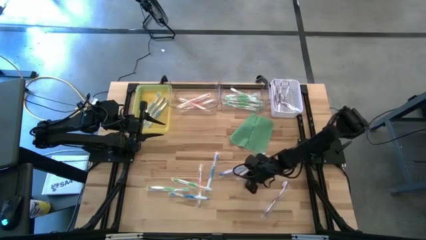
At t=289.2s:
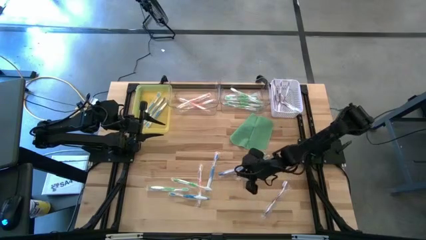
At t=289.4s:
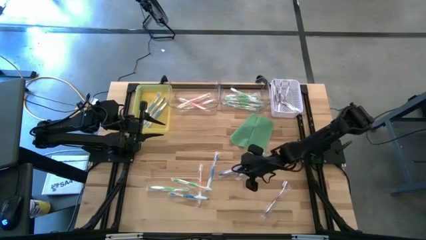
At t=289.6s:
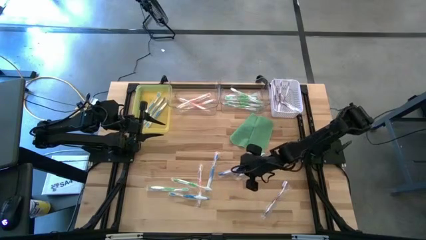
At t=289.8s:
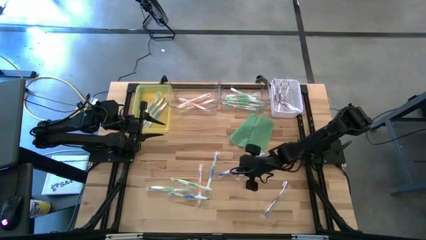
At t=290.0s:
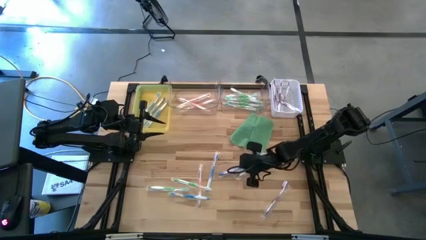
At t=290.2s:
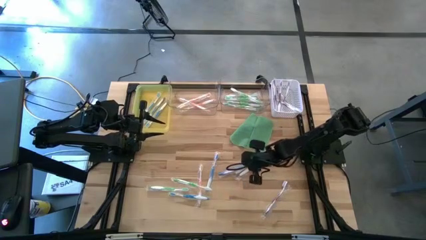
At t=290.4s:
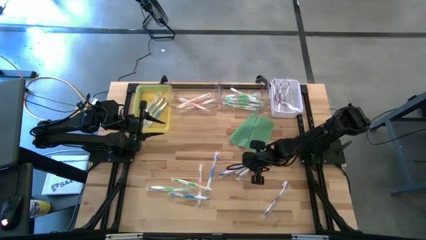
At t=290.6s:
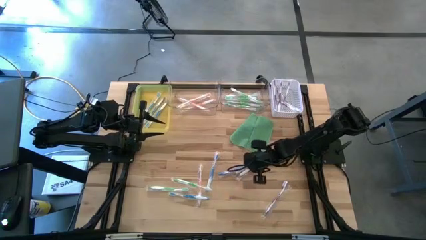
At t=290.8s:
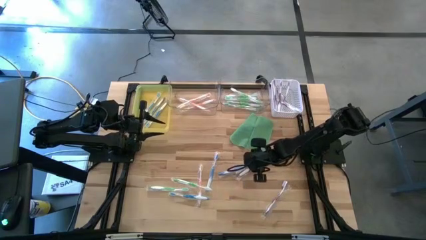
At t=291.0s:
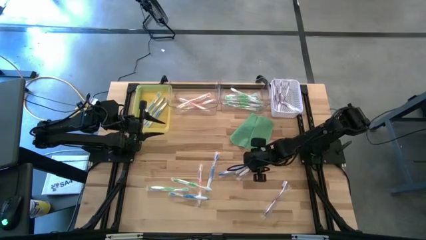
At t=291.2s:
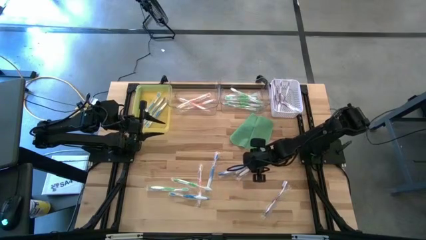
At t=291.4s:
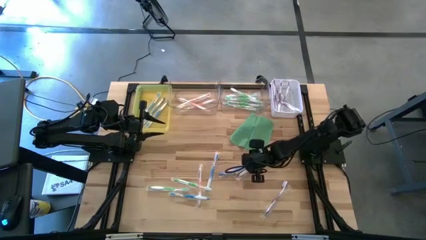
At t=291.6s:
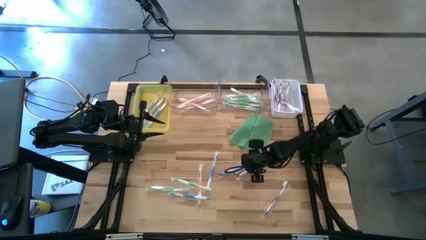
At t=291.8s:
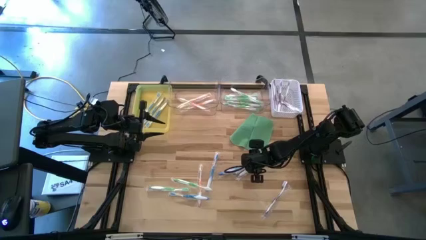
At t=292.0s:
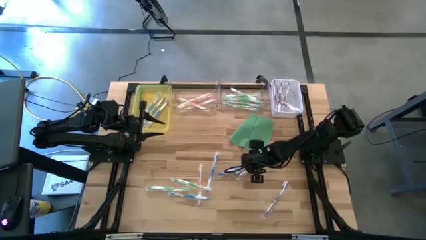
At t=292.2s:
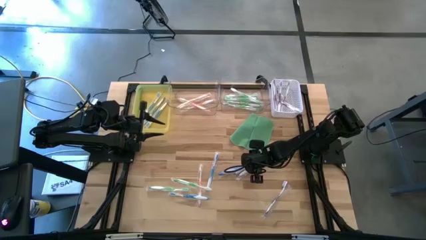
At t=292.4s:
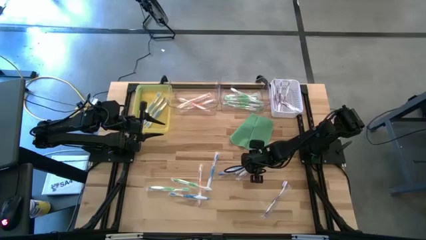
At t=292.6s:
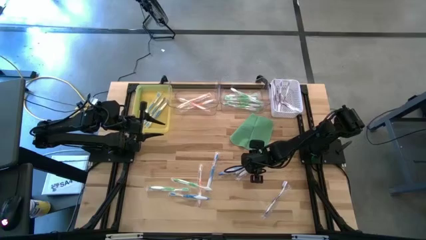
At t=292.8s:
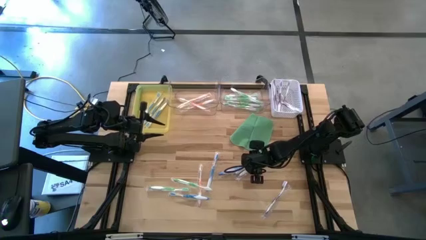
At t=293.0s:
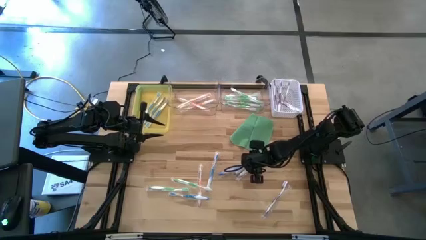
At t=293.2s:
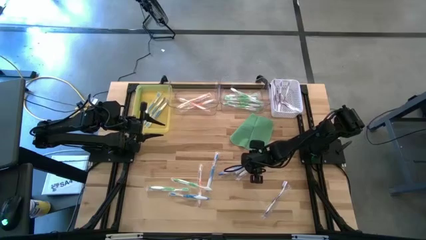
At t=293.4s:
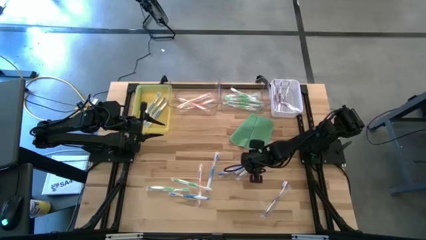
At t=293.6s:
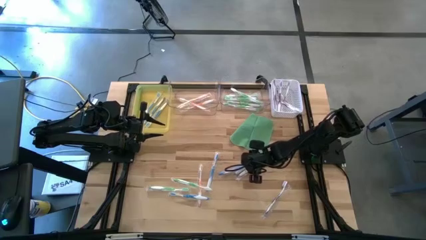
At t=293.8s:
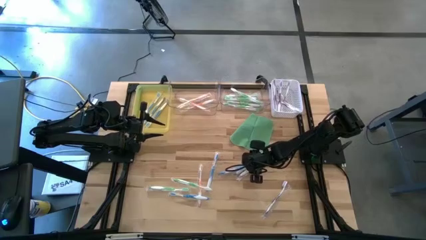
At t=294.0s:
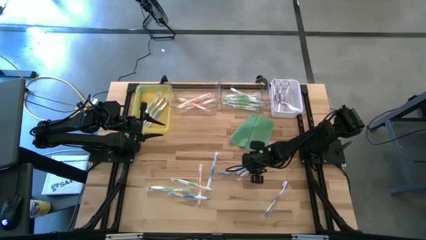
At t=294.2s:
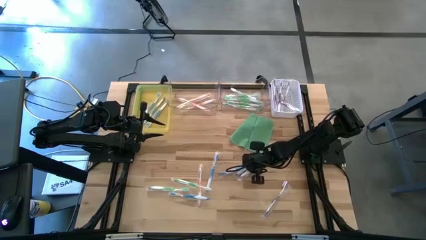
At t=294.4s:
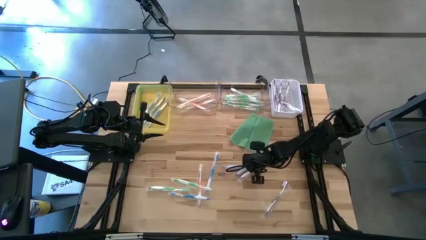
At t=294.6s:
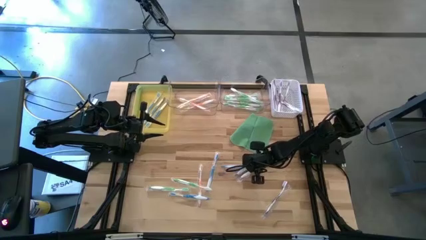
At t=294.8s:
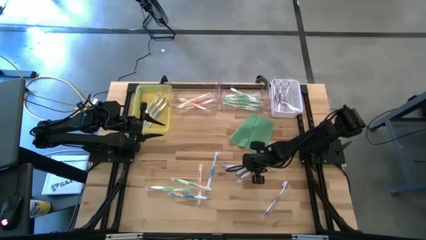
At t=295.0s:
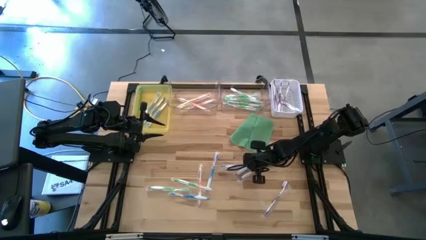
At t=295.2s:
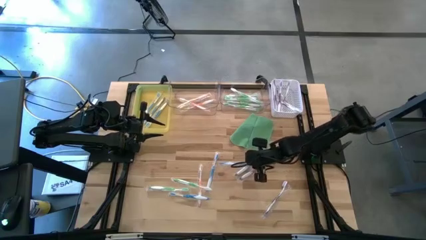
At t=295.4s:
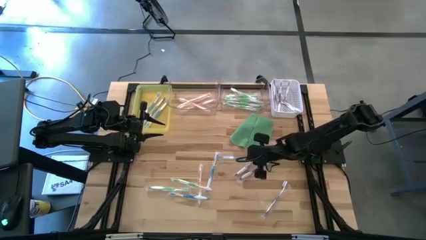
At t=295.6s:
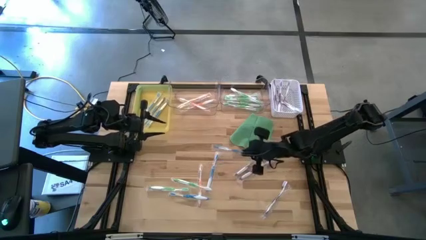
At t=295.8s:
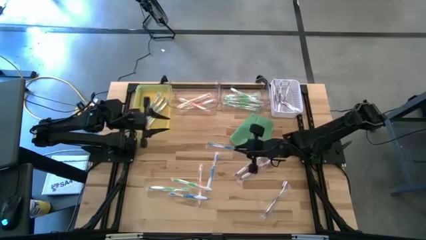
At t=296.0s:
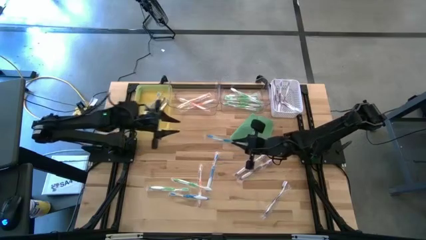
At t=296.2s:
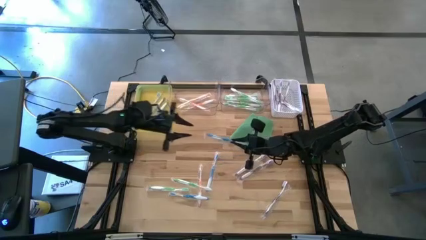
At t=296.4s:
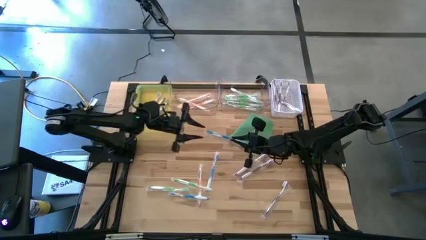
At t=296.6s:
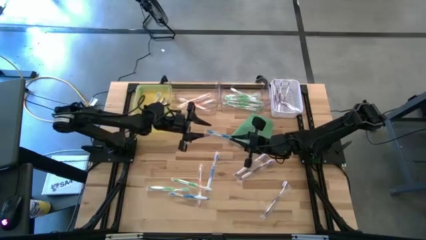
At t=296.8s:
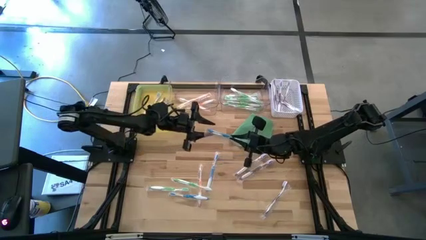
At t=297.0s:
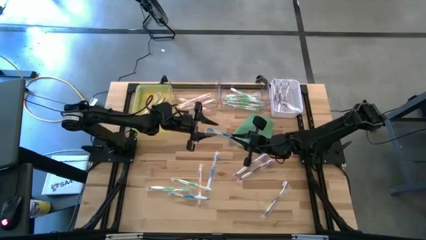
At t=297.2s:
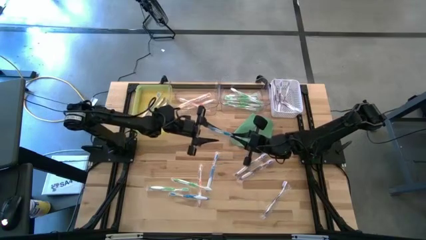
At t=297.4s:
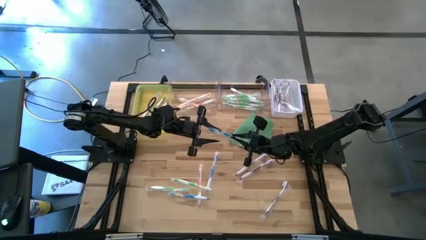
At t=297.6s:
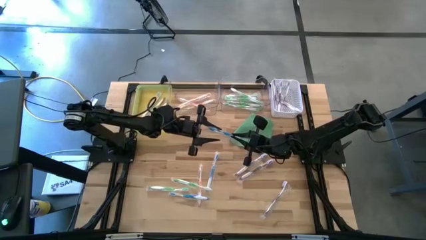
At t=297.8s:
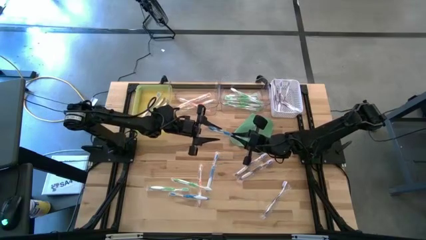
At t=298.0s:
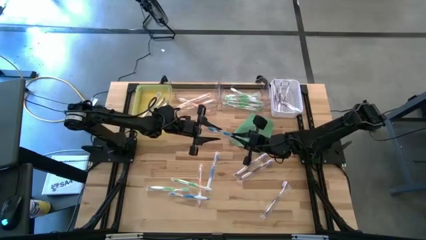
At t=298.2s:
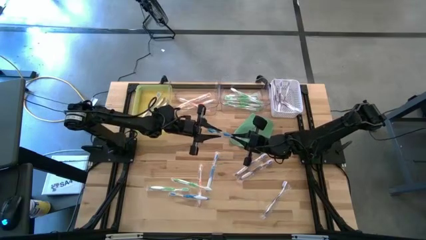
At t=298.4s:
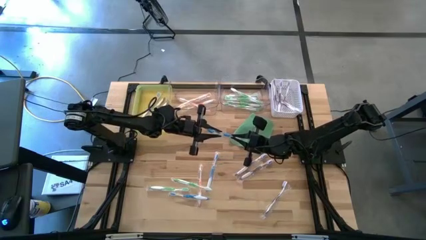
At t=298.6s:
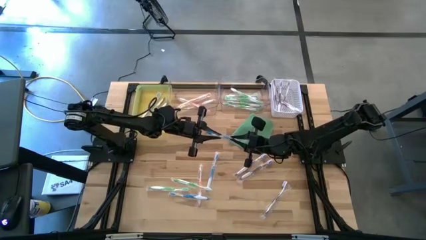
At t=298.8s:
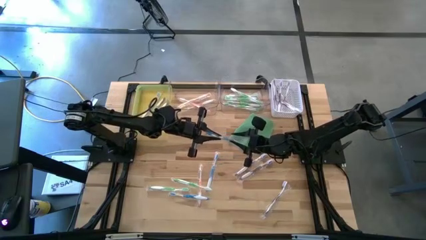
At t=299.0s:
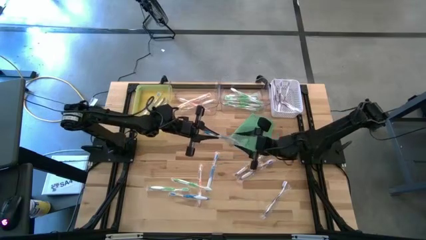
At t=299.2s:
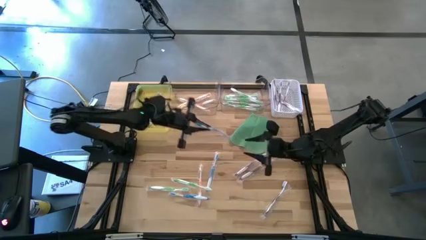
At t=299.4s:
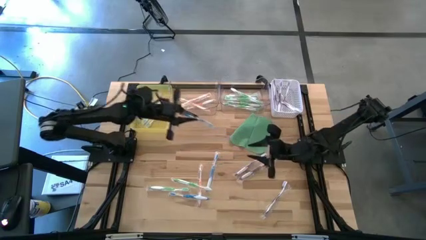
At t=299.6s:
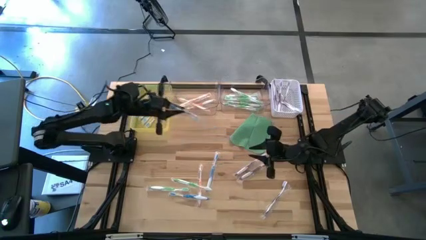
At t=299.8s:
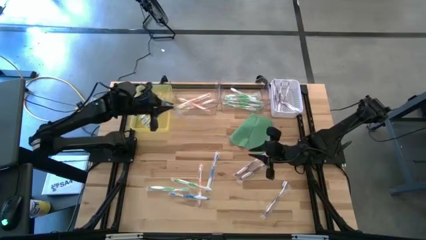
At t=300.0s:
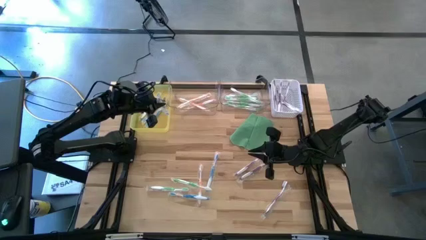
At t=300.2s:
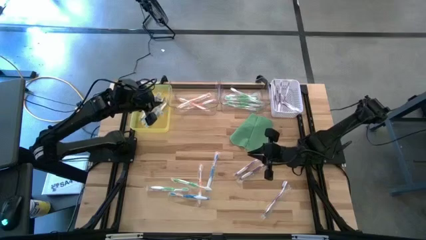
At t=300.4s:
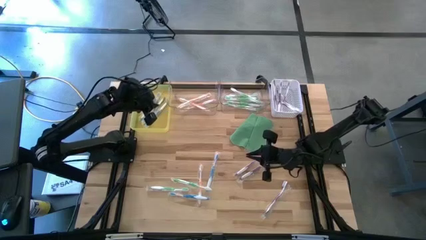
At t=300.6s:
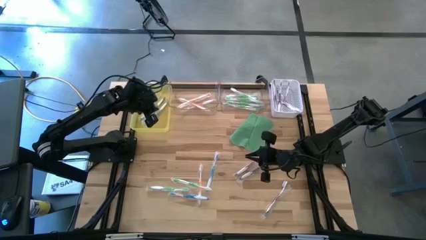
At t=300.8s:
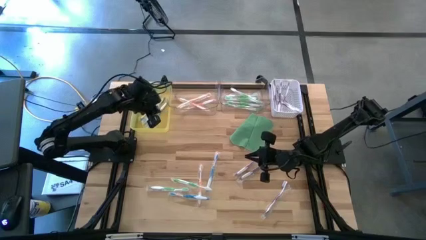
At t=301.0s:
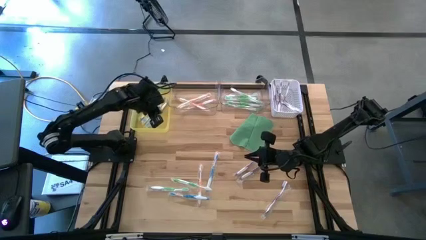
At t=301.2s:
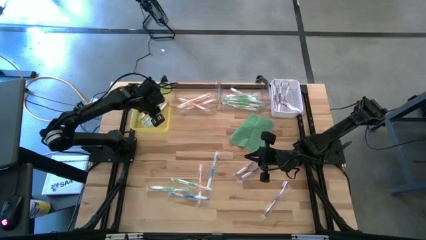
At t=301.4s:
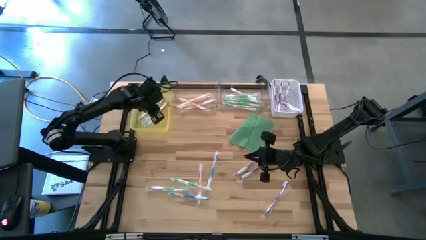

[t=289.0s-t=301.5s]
Task: Pick & Place Toothbrushes
Put the blue toothbrush into the yellow bin

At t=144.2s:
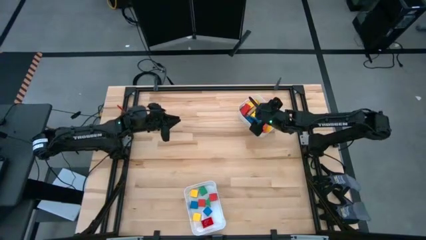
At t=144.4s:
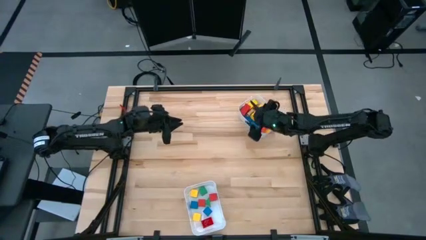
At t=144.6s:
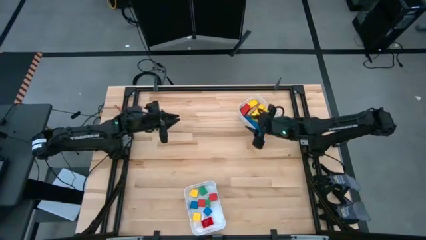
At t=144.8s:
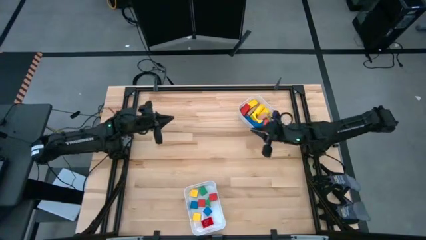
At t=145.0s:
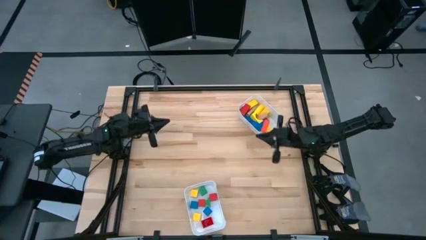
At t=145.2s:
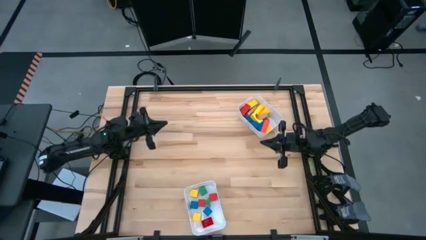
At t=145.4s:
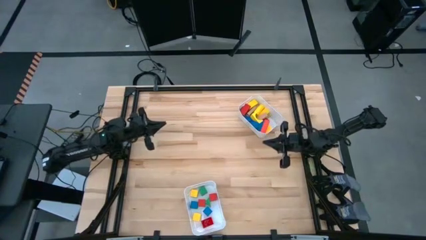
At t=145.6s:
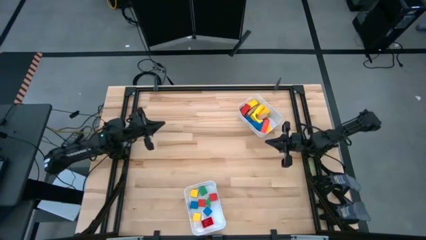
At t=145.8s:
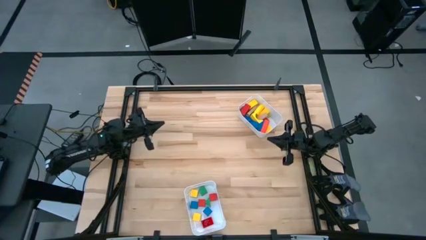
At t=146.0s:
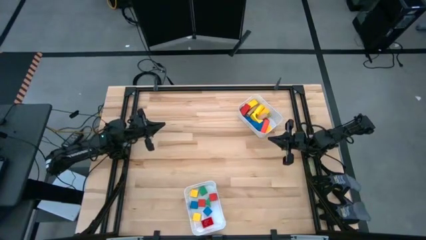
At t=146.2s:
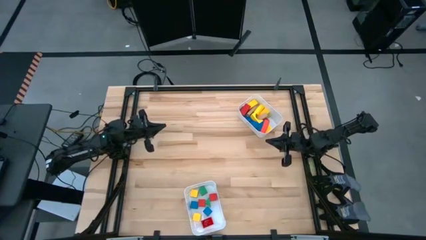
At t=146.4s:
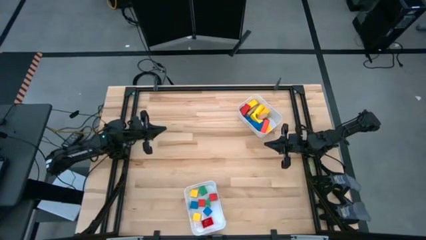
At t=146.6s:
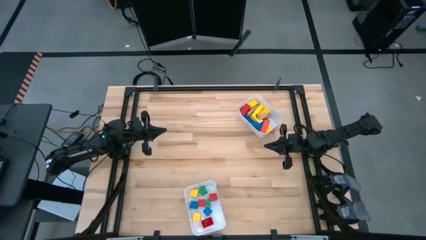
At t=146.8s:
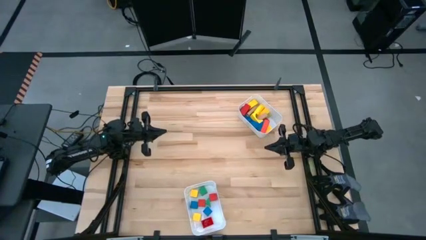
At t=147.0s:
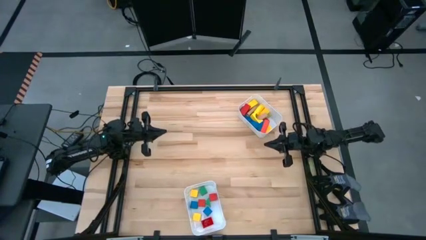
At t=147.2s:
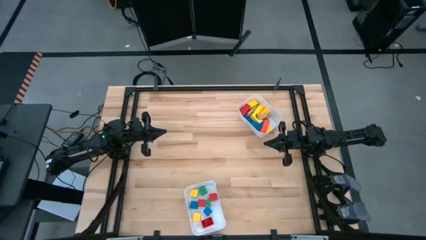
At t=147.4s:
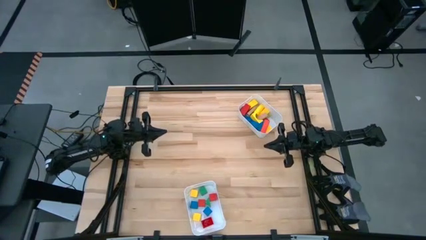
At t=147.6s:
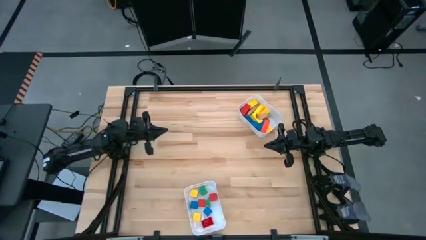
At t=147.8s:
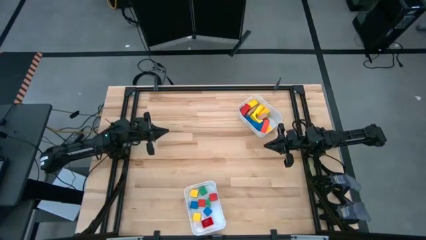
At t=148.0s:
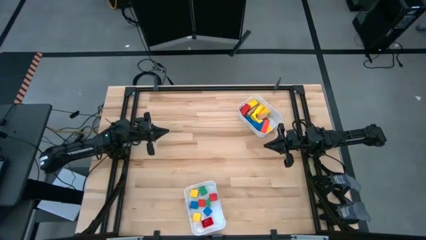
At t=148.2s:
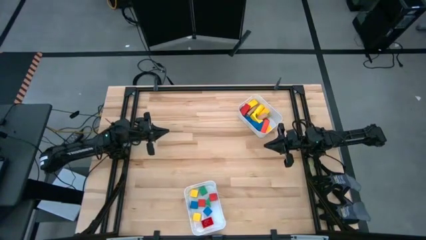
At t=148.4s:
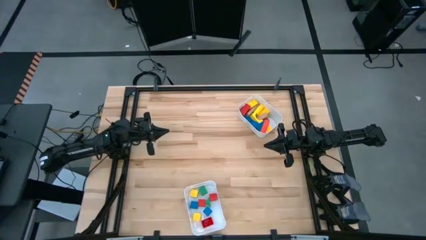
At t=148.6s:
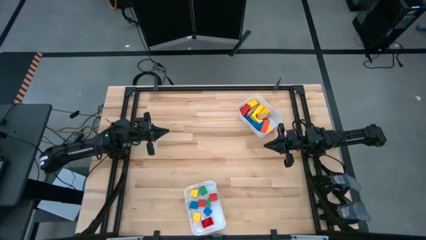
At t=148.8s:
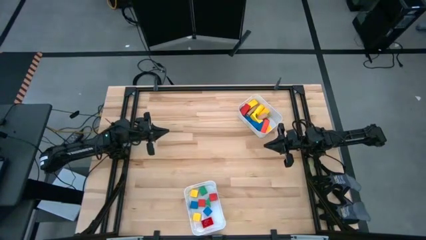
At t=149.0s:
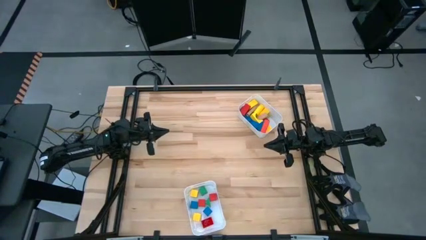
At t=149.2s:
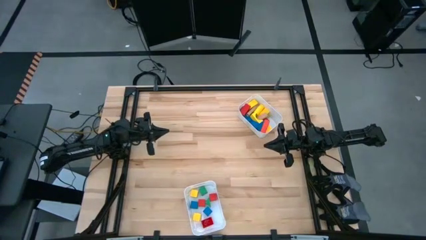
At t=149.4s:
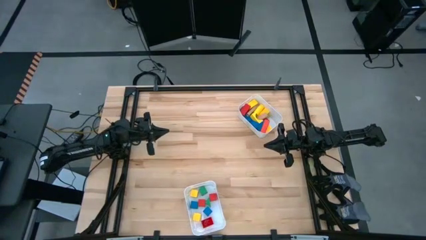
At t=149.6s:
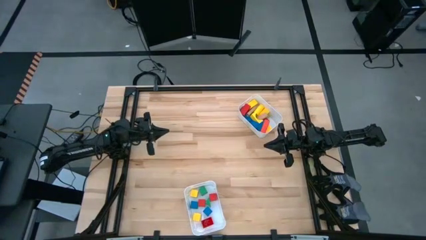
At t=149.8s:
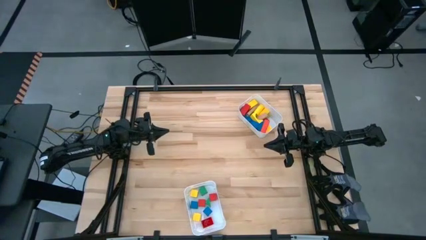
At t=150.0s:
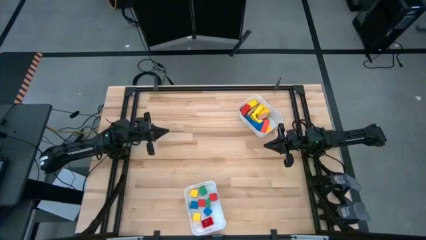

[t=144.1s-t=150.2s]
Task: Sort blocks by size
Return to Home Position
